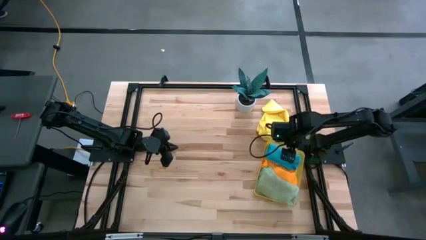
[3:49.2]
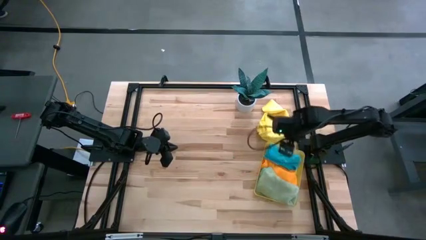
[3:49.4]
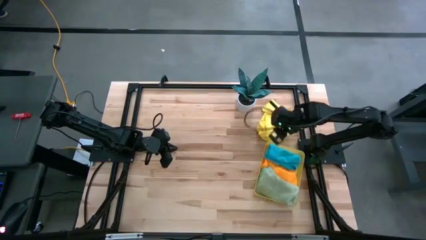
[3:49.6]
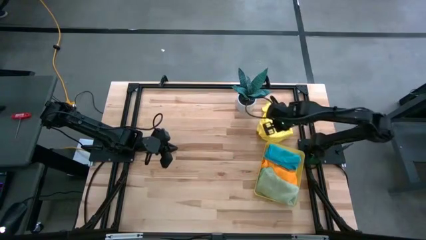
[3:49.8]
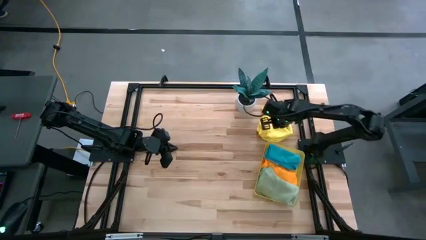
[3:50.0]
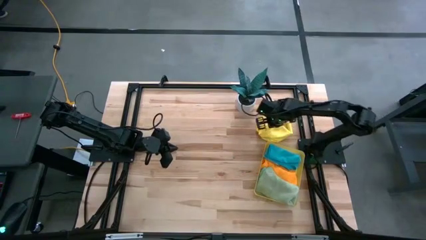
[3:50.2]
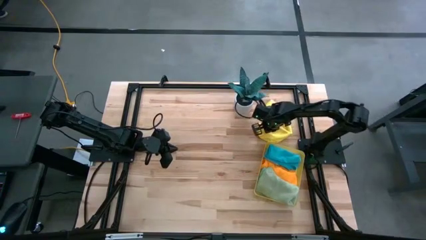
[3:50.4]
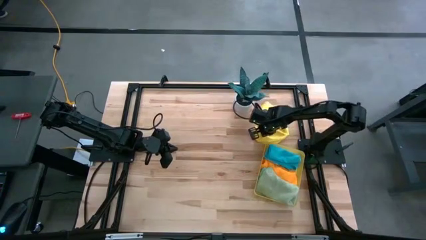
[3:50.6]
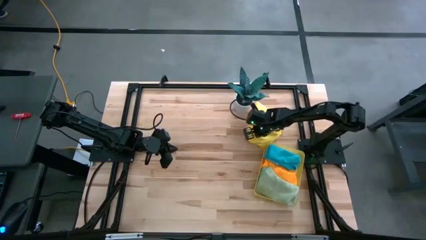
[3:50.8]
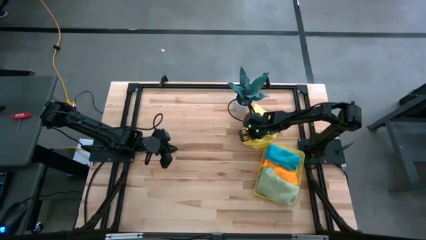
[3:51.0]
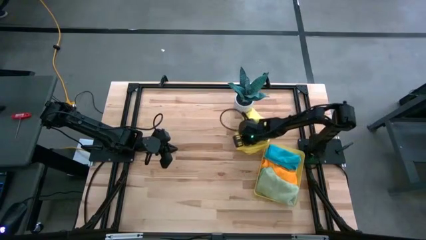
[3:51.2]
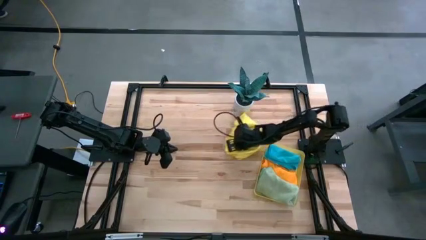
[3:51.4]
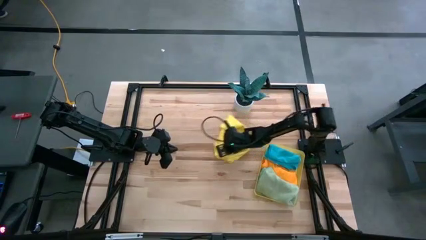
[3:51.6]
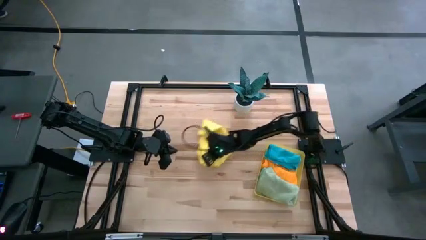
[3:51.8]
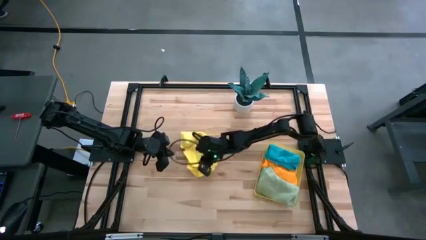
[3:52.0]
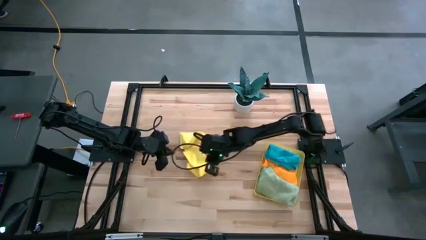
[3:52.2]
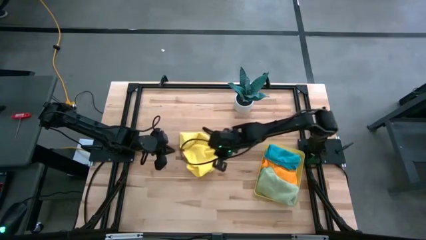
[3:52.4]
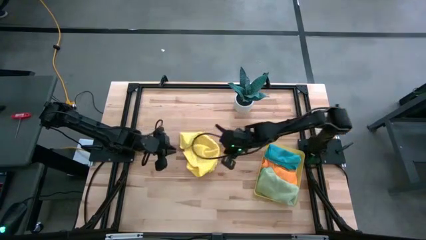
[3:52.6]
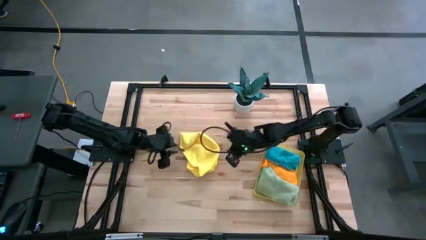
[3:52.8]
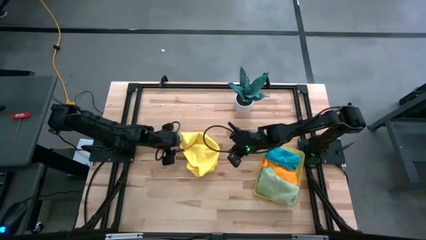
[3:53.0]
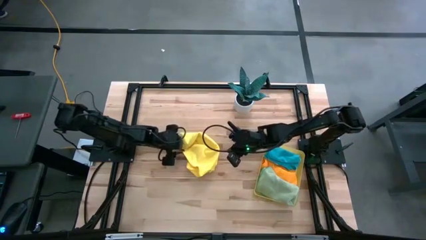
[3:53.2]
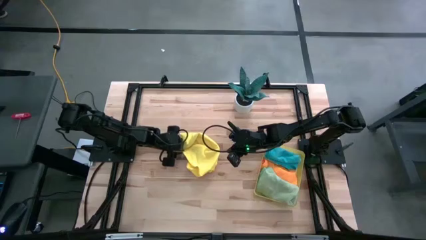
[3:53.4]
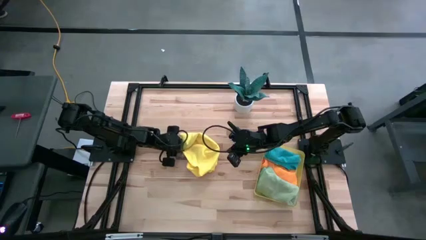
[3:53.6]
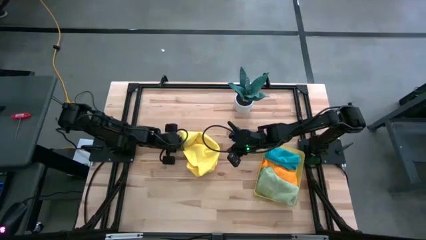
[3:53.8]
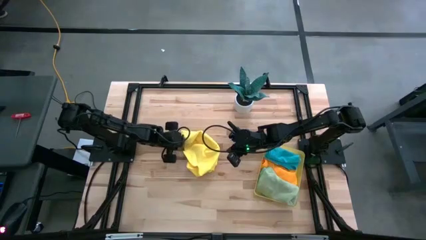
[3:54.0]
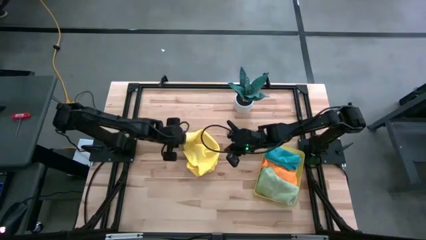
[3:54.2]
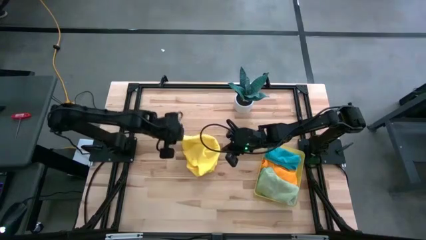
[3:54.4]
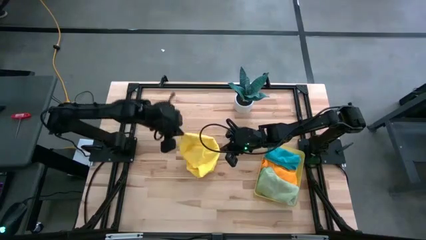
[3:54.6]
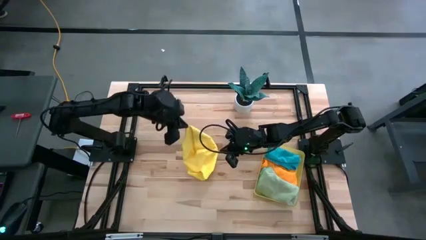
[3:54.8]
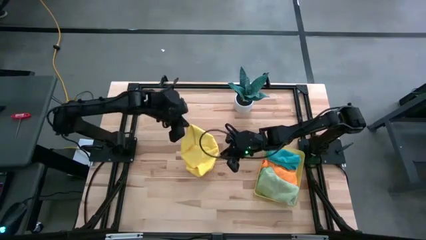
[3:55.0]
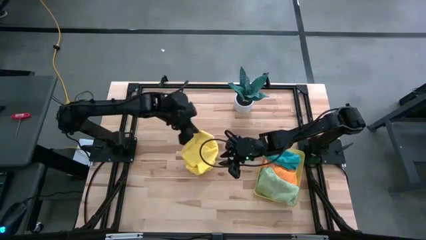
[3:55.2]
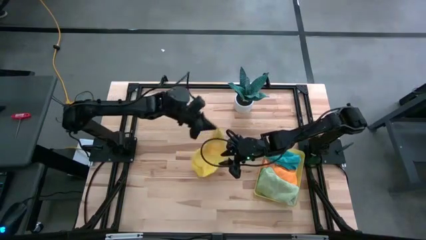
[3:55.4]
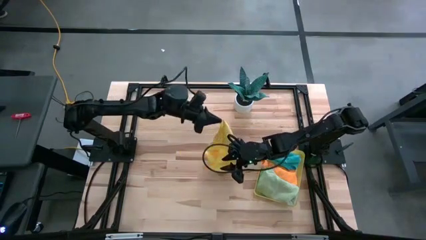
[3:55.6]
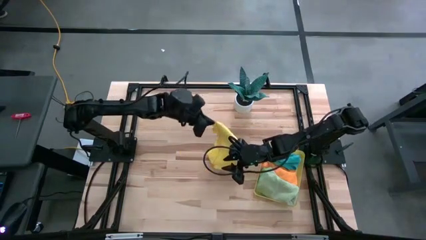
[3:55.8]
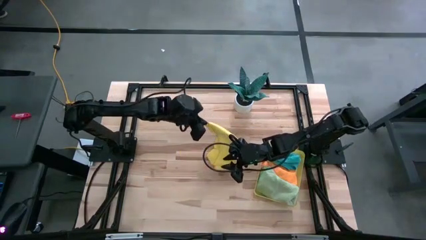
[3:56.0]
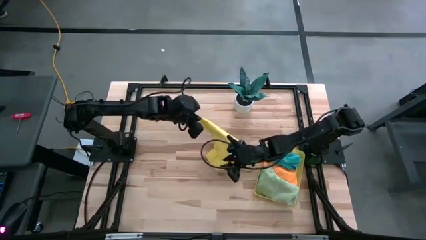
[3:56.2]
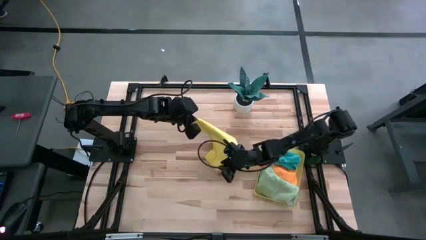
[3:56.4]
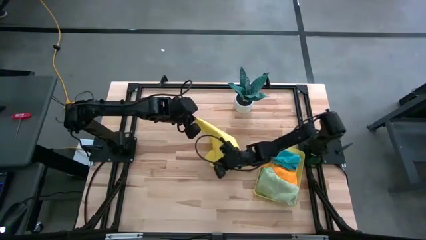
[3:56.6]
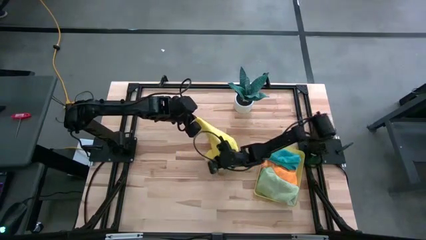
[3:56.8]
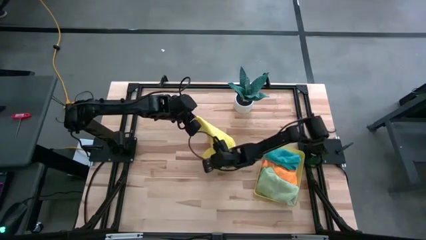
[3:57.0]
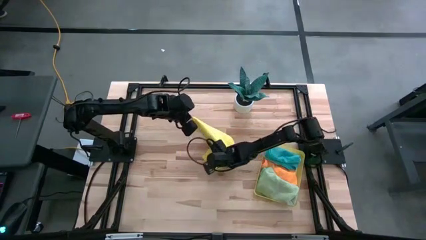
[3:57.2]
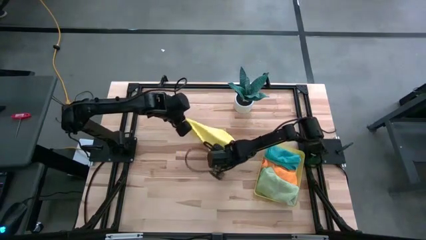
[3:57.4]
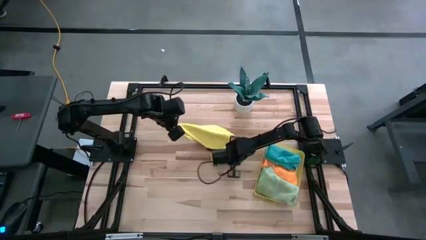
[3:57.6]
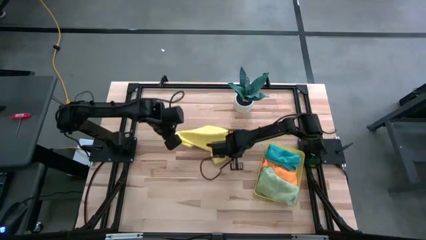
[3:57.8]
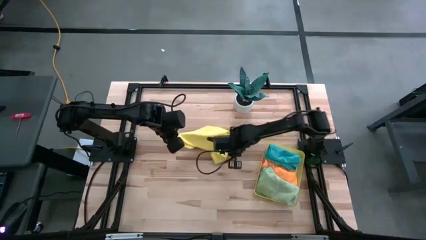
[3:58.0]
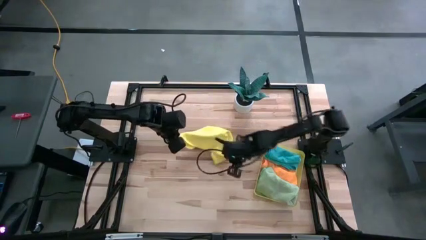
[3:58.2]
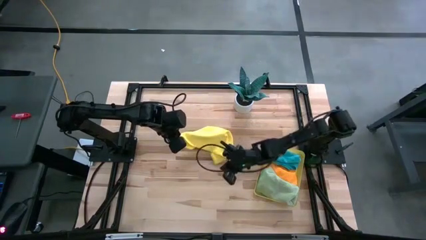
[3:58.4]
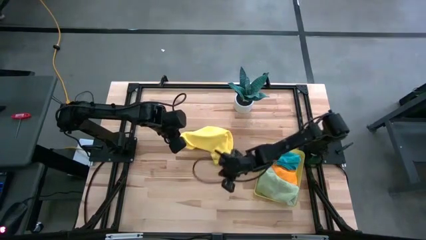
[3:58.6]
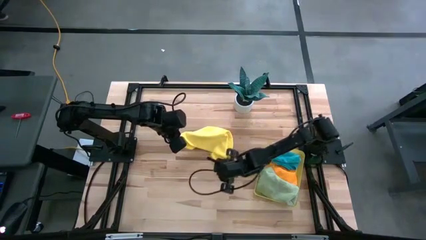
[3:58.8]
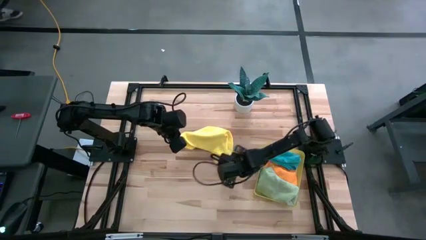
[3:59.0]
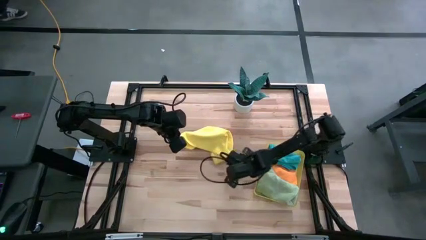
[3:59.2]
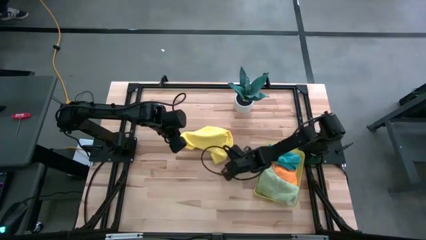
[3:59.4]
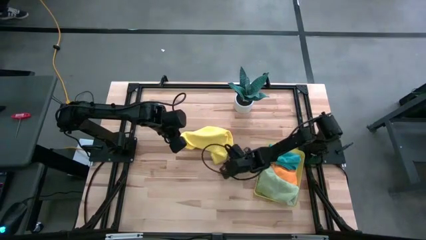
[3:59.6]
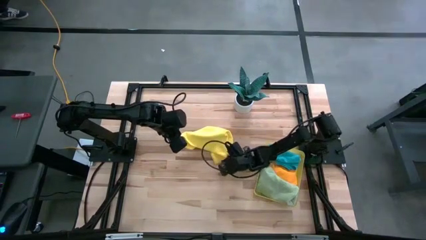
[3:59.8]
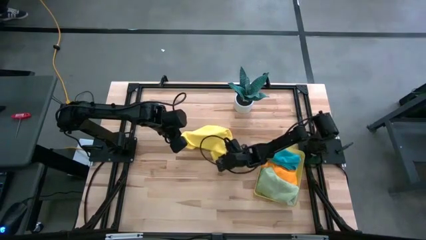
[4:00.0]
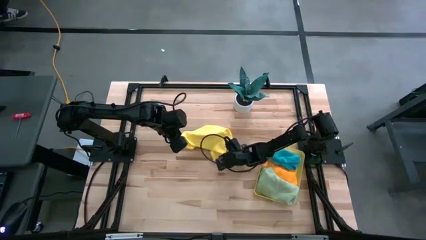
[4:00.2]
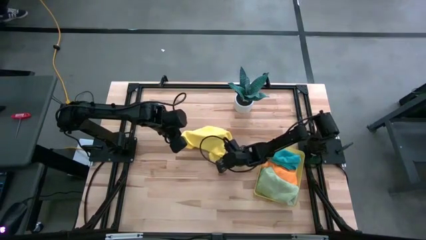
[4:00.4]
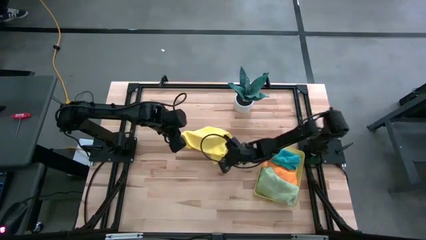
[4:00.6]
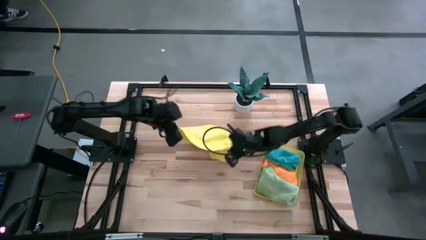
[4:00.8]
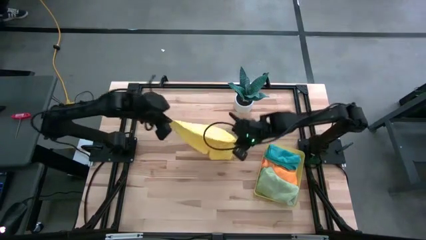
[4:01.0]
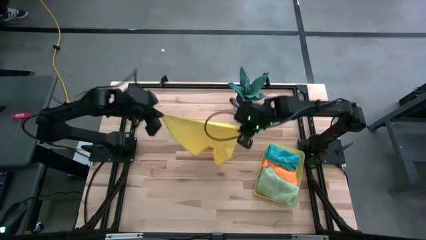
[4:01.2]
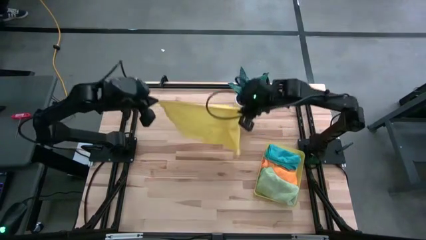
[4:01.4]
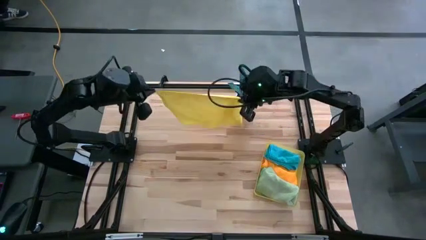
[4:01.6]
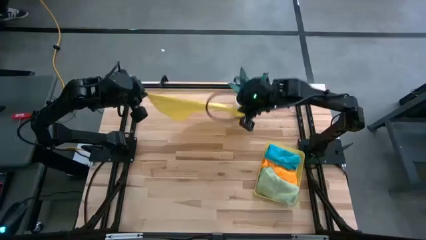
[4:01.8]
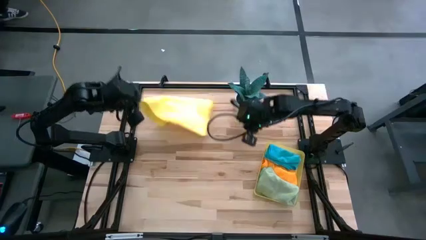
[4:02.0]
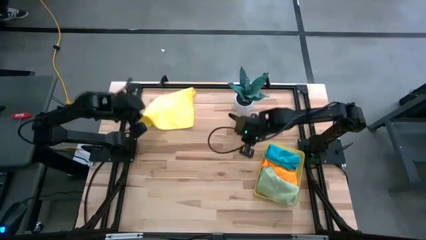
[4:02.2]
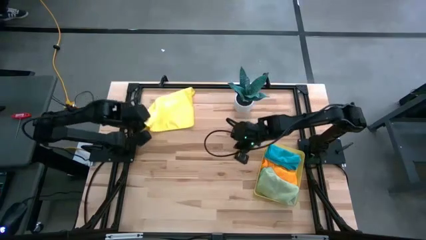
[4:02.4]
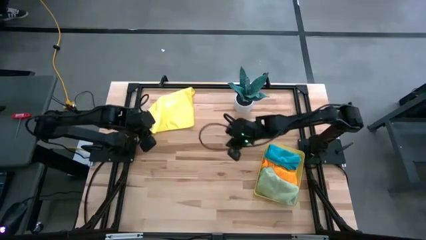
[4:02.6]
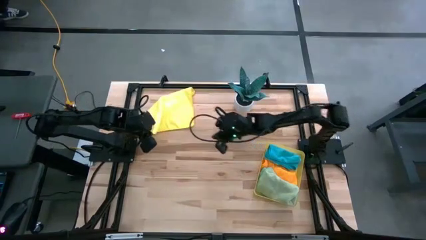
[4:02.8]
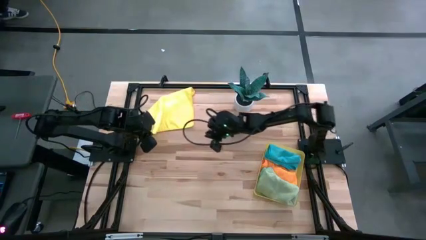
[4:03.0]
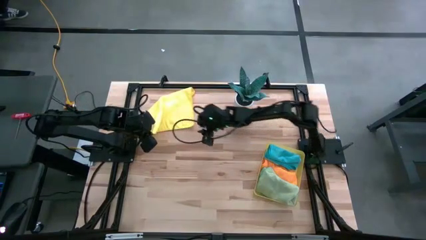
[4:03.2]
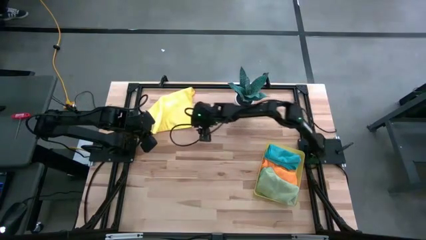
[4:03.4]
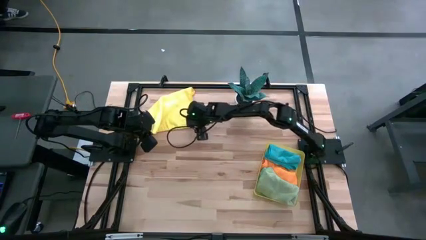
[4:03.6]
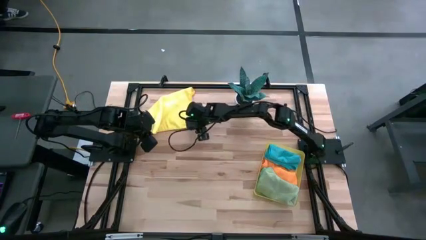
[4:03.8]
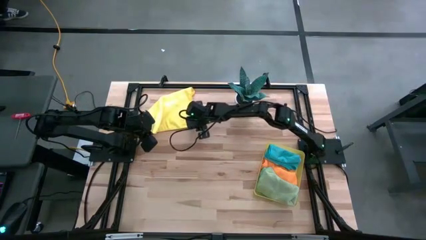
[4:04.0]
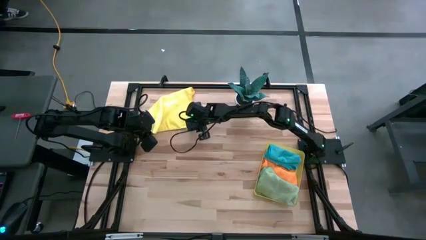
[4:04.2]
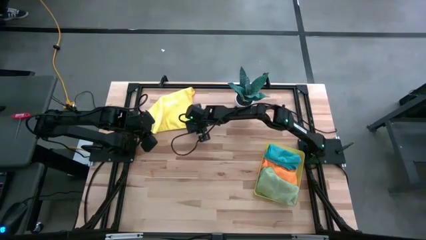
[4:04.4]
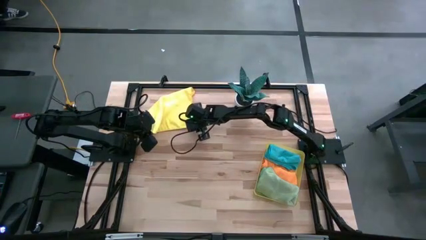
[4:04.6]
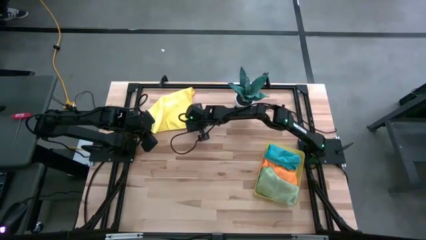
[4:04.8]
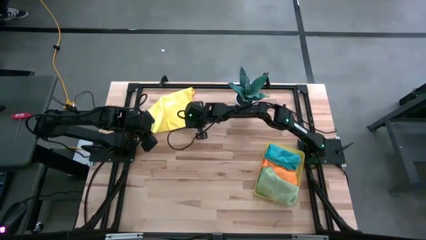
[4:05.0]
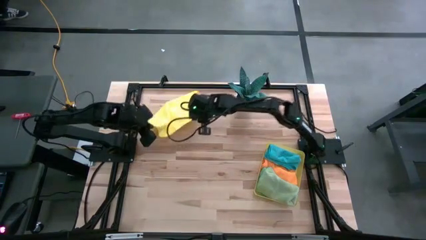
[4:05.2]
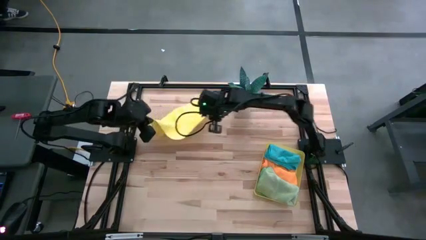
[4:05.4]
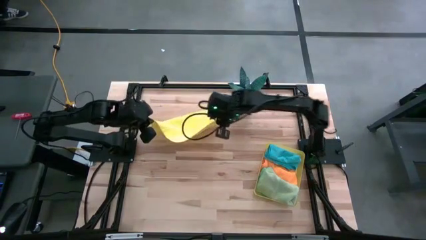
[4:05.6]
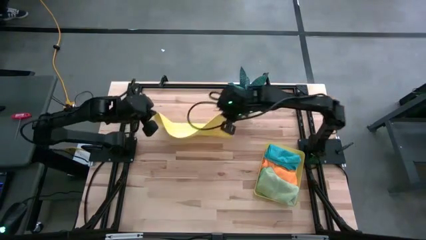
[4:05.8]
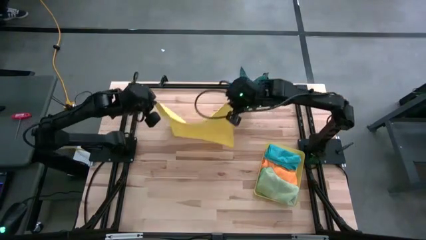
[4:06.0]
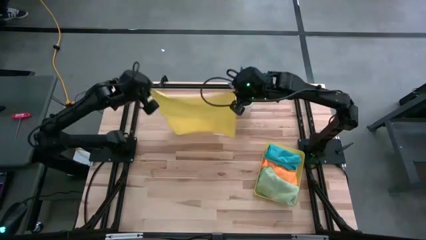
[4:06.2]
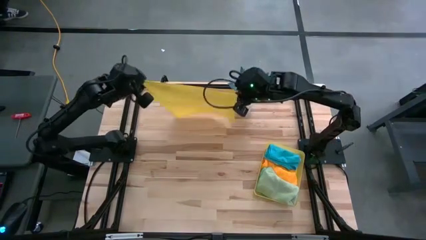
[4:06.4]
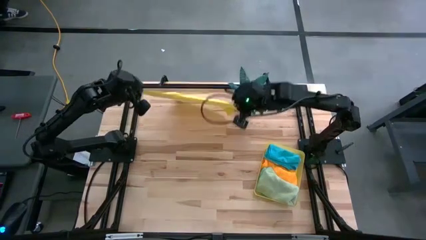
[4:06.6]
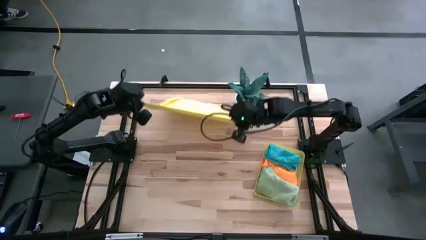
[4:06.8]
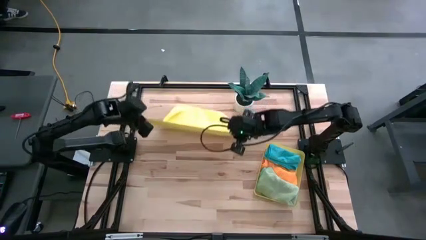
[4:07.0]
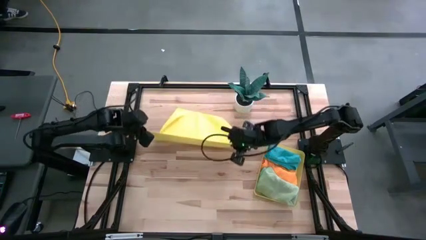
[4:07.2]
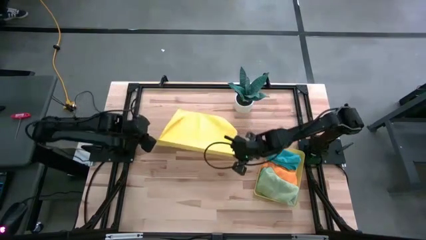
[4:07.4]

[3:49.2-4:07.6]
Task: Fold microfiber towels
Fold the yellow microfiber cloth
